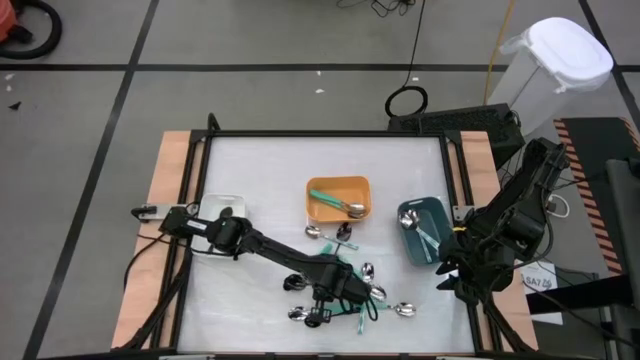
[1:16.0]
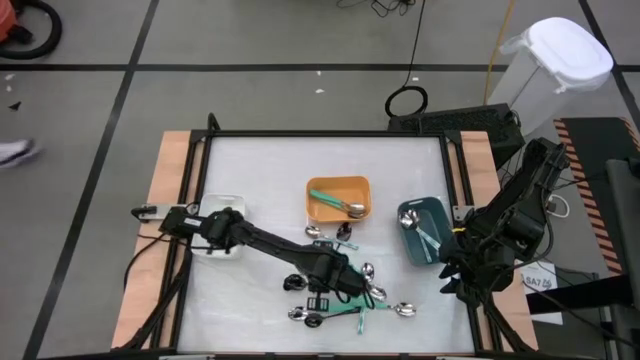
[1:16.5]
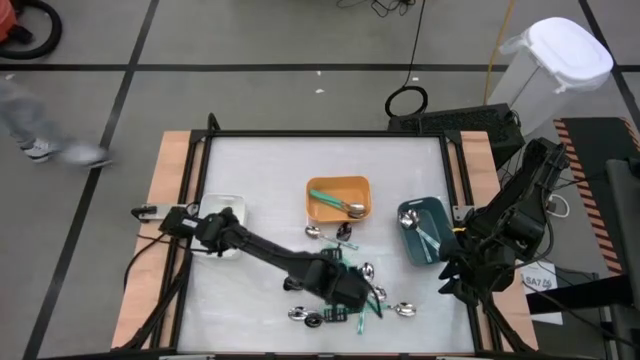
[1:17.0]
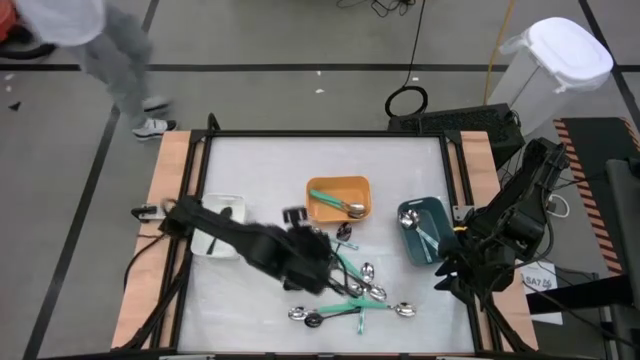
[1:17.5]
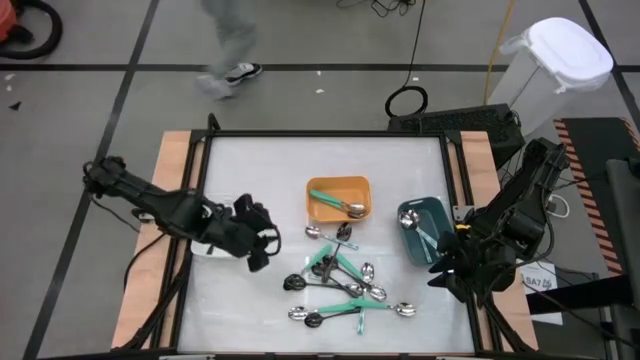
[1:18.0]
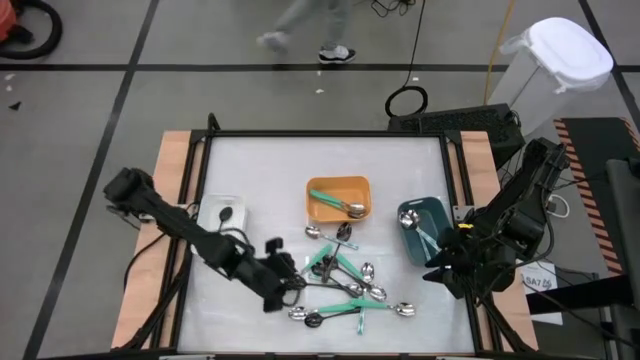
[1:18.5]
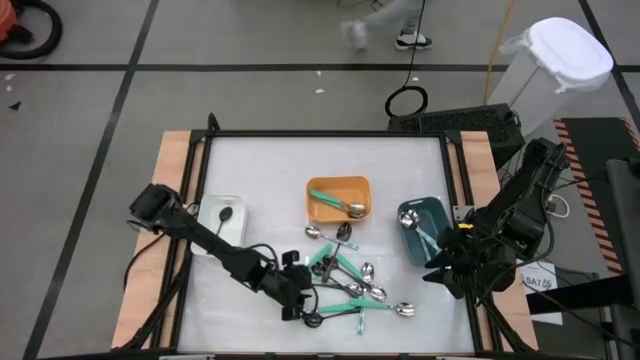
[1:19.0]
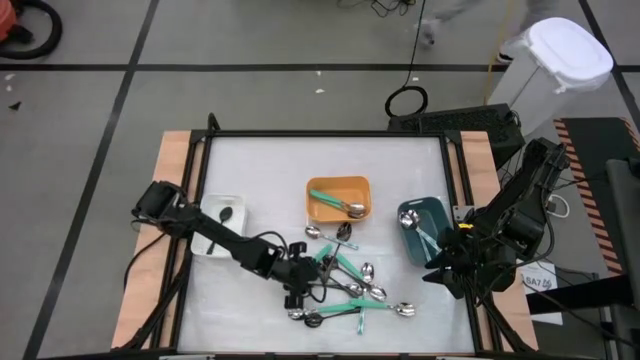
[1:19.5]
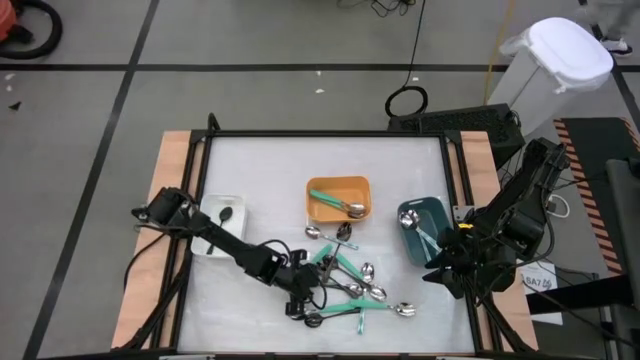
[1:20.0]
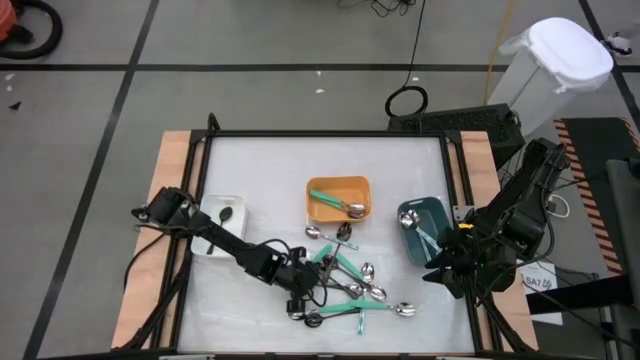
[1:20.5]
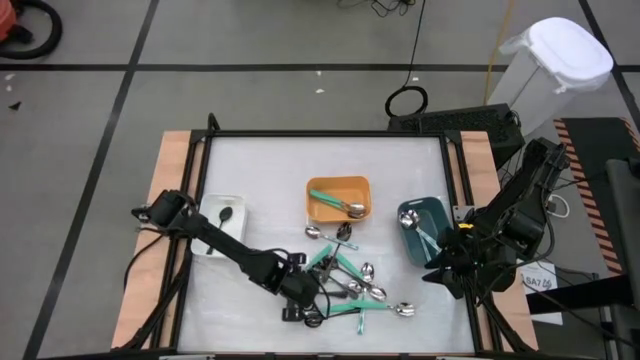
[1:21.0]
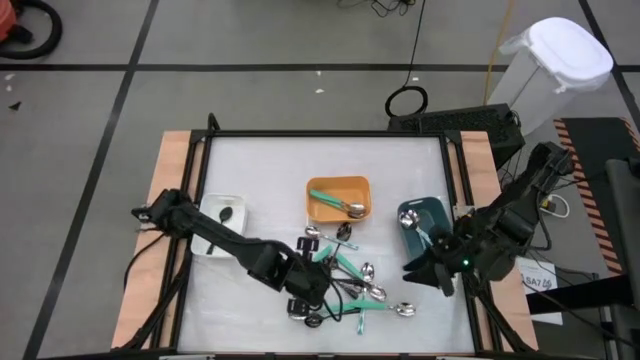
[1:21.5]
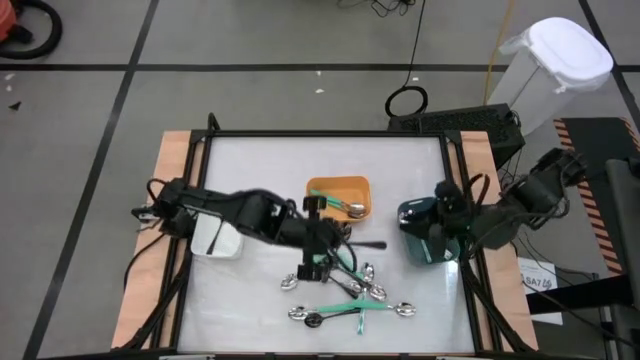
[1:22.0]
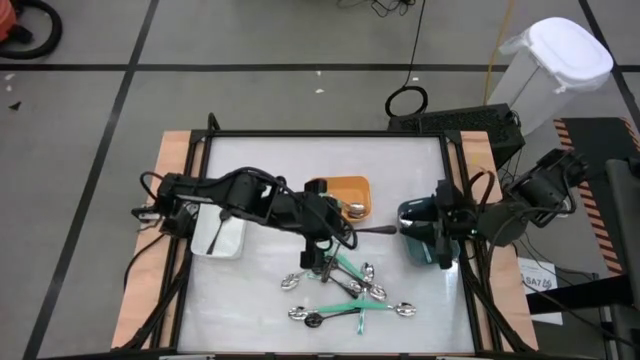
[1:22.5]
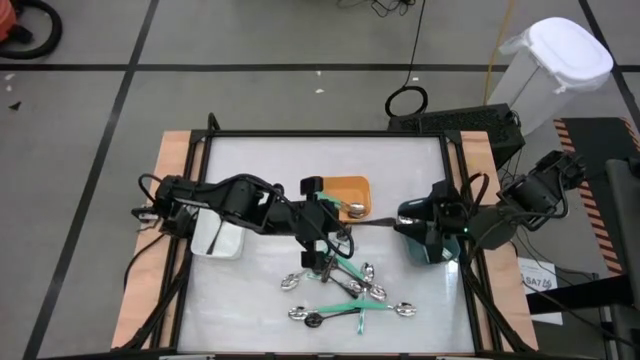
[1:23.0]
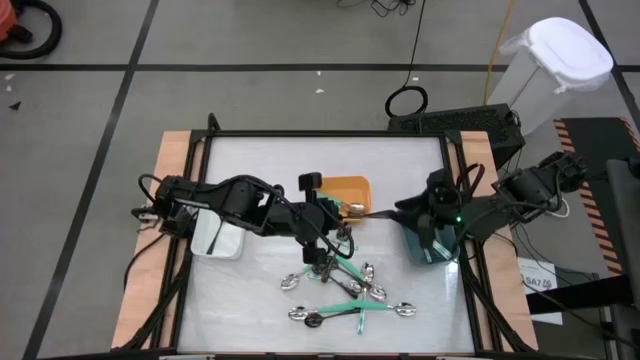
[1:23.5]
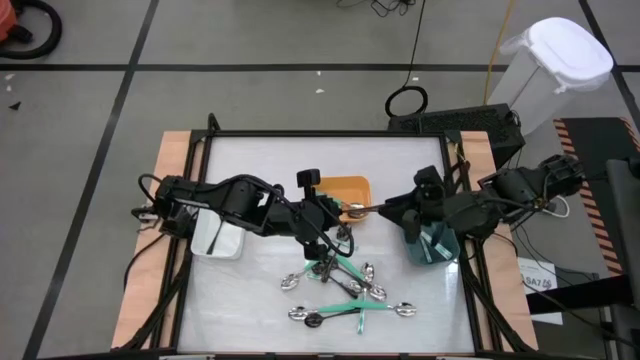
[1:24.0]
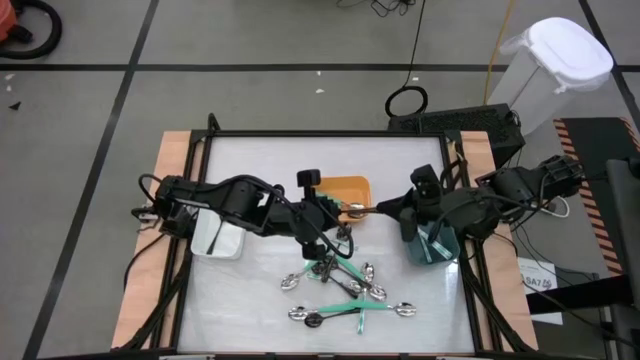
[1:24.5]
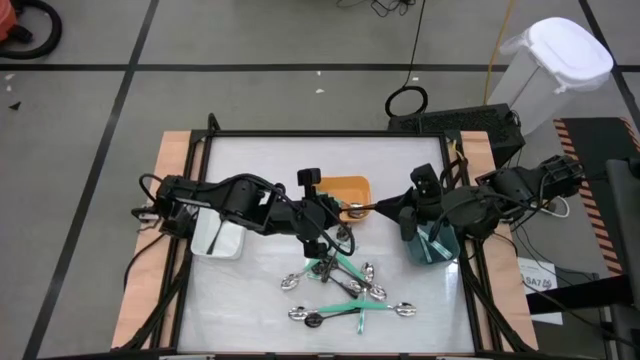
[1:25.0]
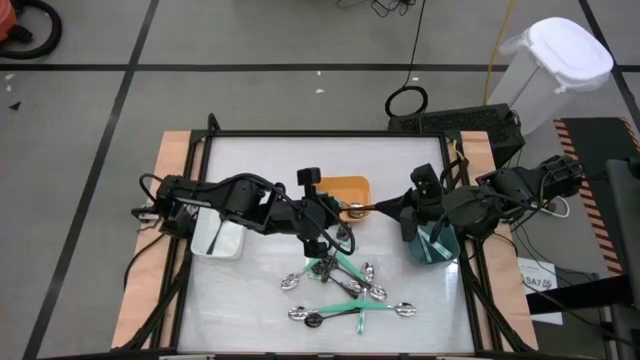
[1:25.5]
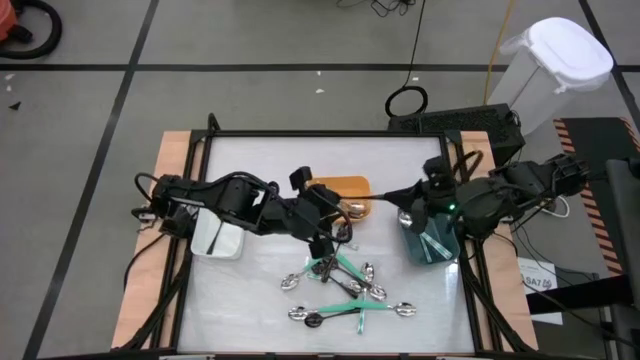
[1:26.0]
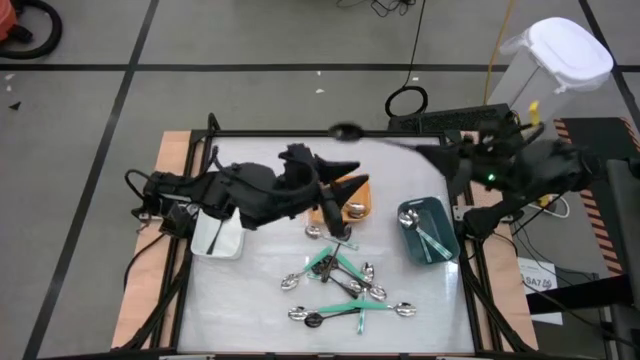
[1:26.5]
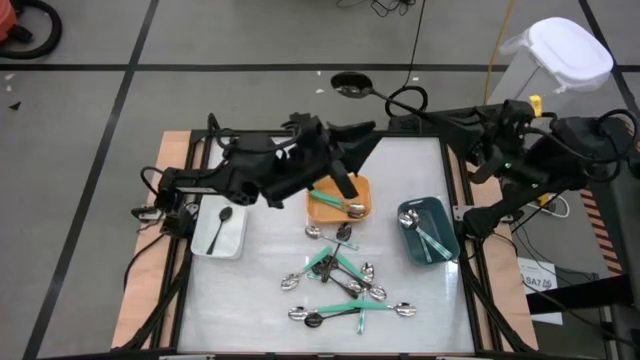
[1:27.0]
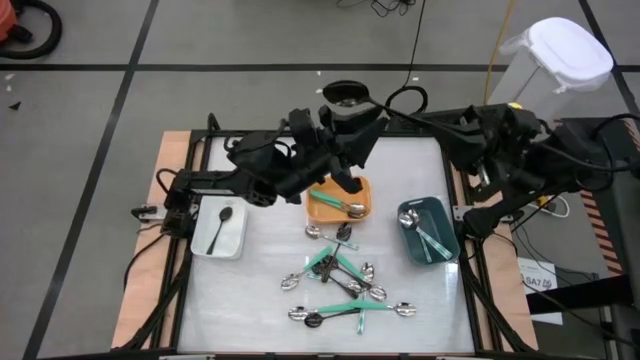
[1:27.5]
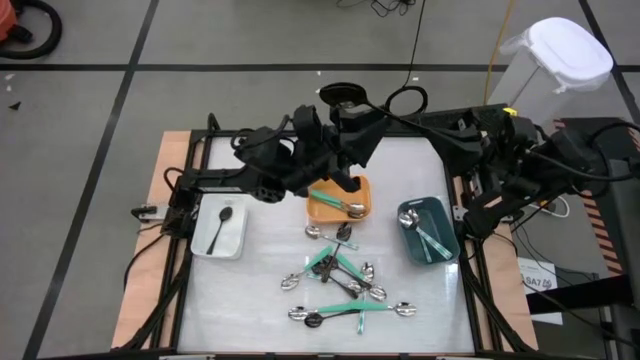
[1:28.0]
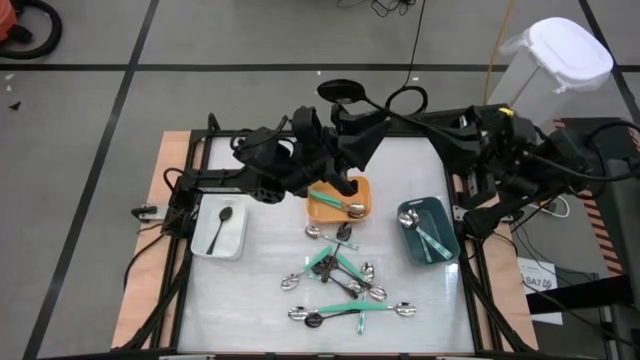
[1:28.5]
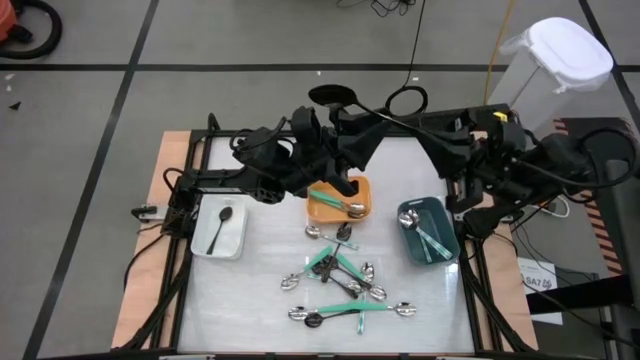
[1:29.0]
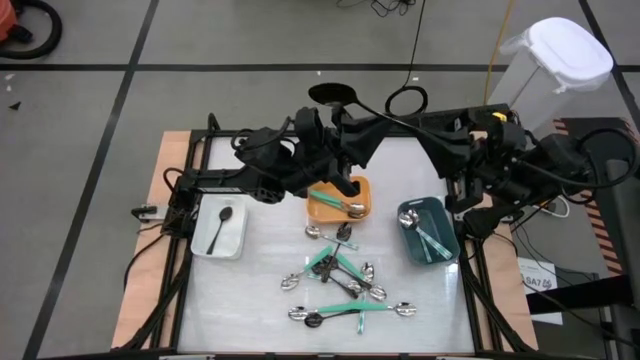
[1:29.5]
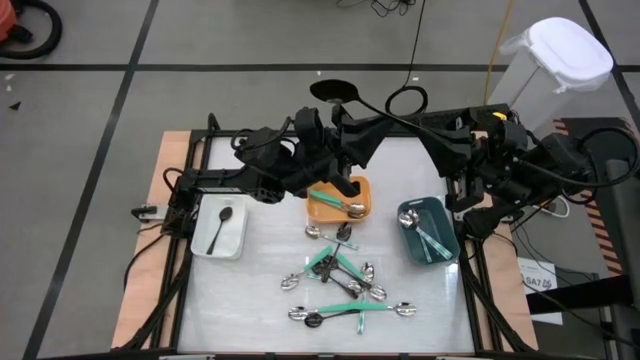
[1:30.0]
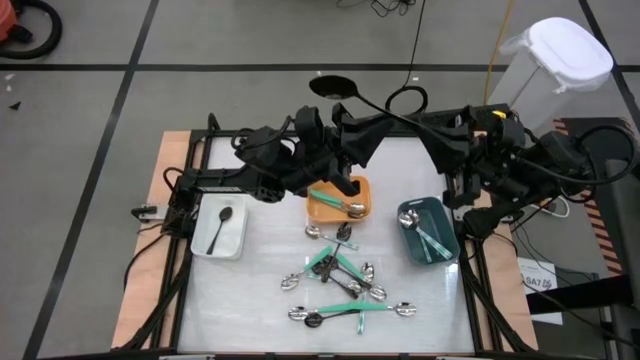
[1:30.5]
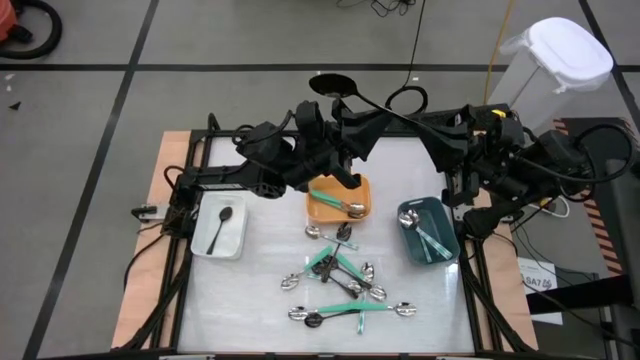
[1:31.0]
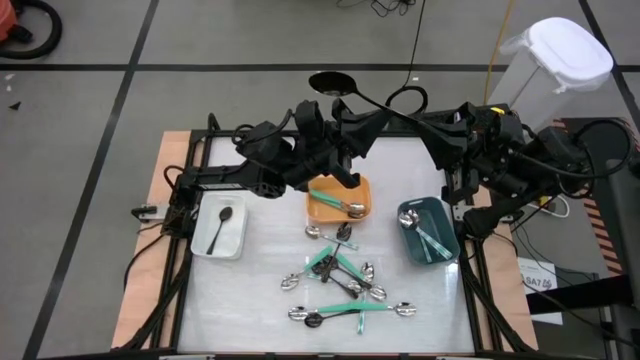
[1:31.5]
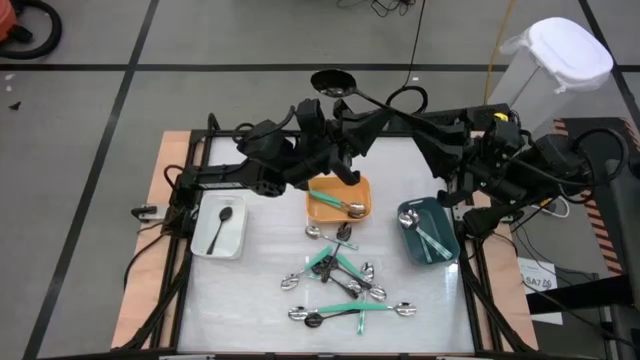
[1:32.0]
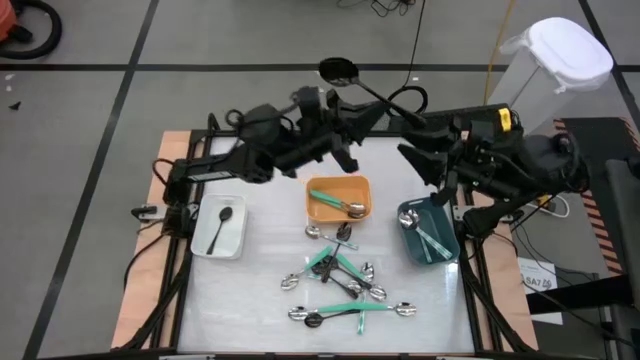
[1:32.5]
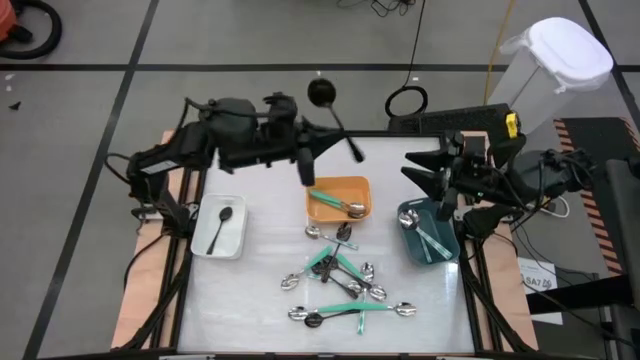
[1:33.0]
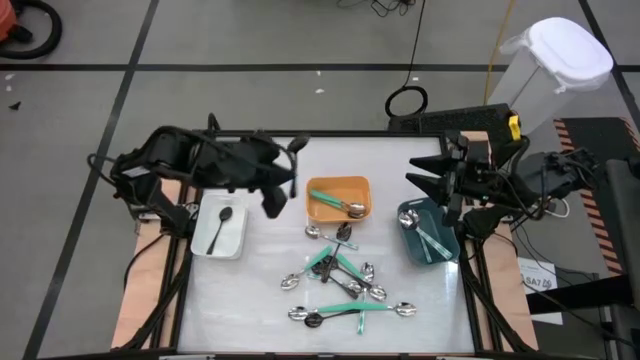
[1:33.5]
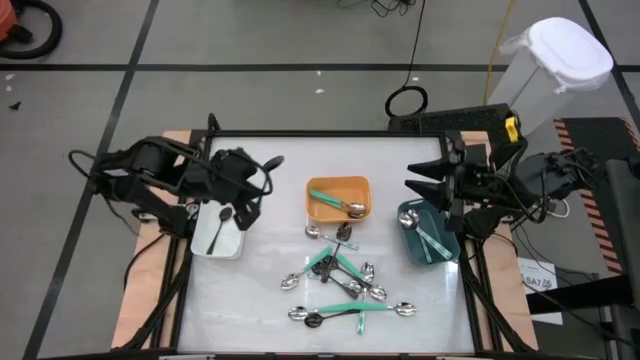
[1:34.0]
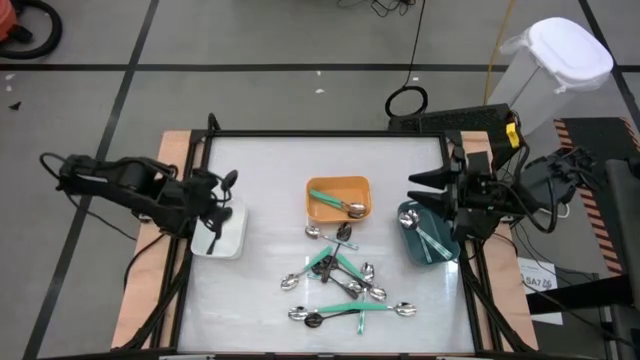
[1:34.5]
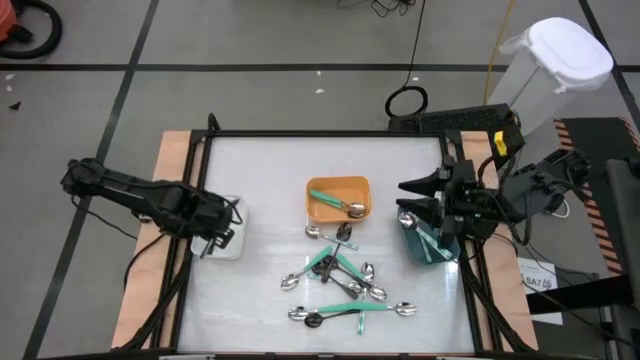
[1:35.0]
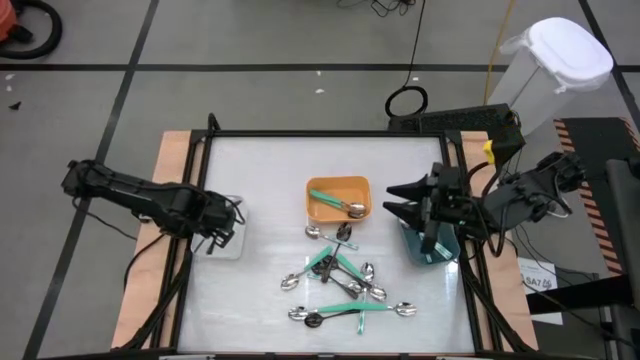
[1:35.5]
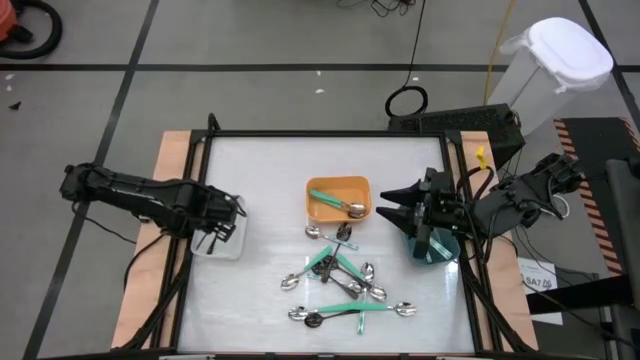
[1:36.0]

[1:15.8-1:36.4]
Task: Sort silverware by color (type)
Put the black spoon into the white bin
